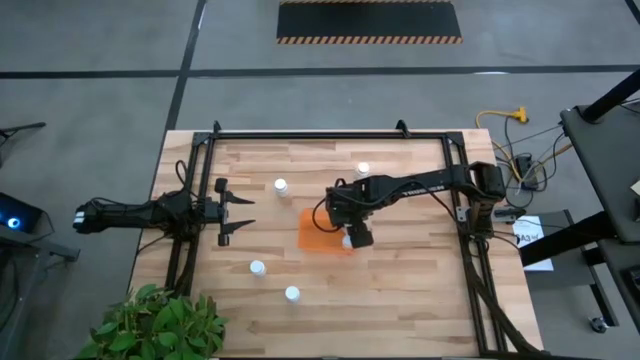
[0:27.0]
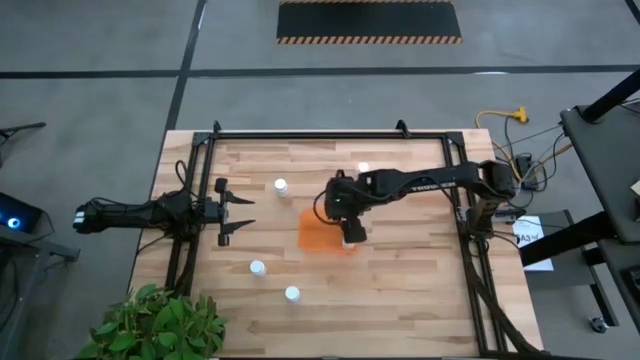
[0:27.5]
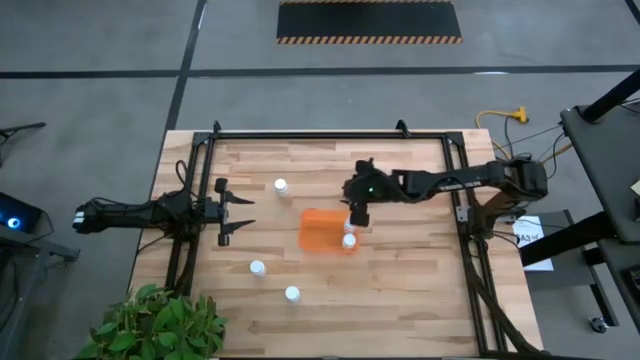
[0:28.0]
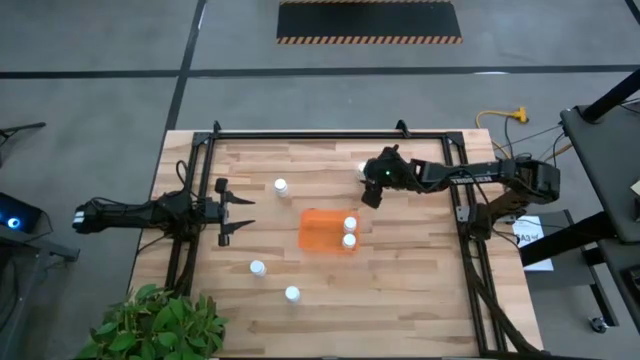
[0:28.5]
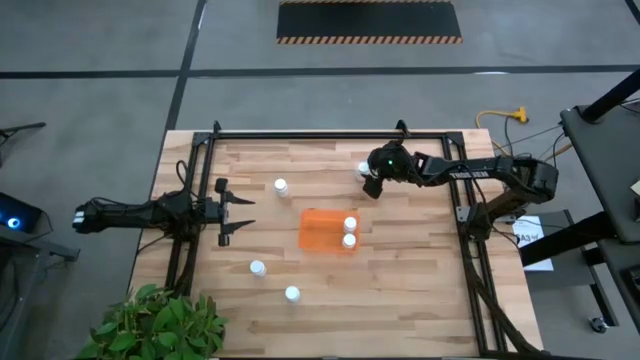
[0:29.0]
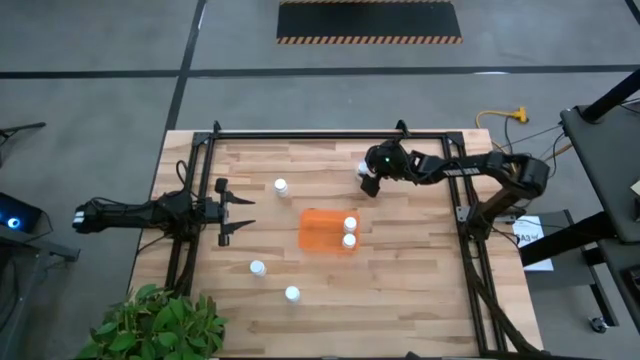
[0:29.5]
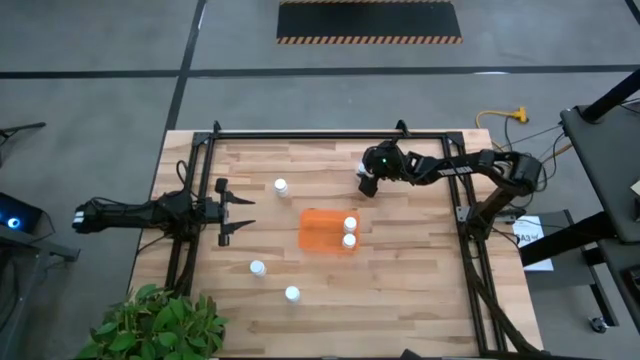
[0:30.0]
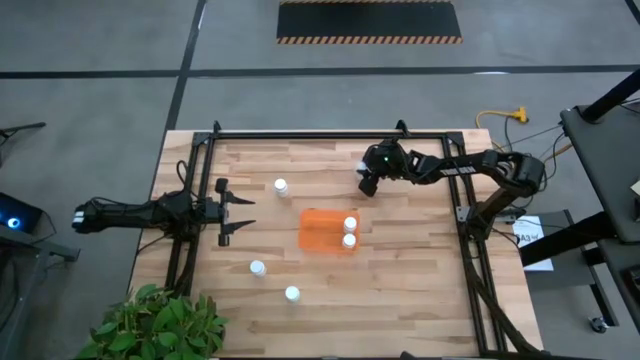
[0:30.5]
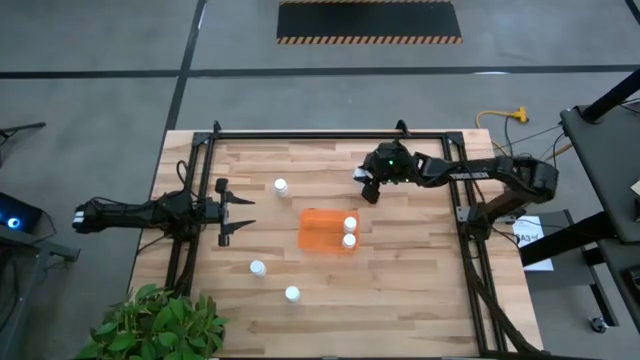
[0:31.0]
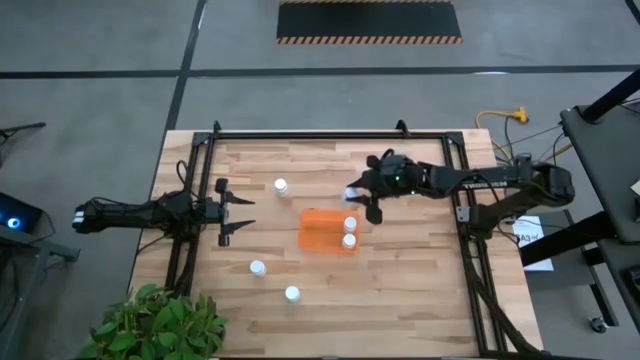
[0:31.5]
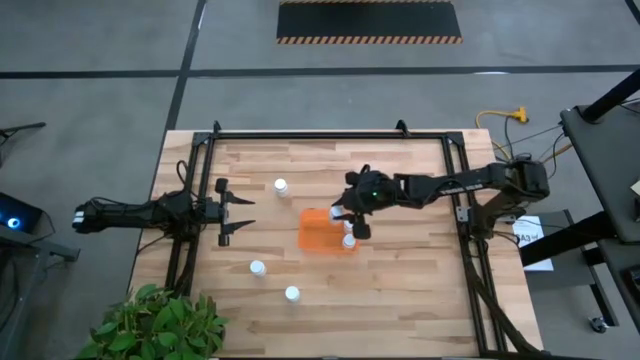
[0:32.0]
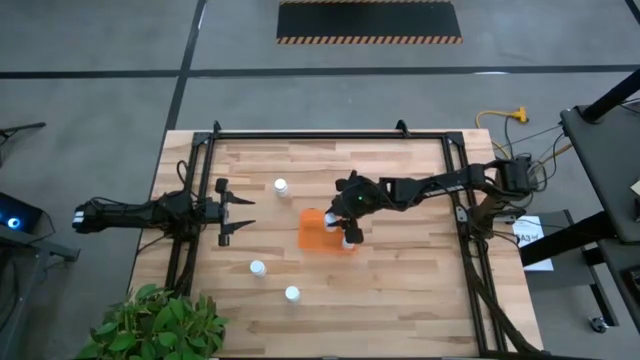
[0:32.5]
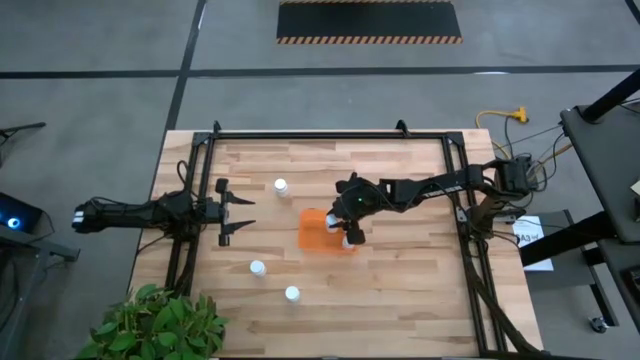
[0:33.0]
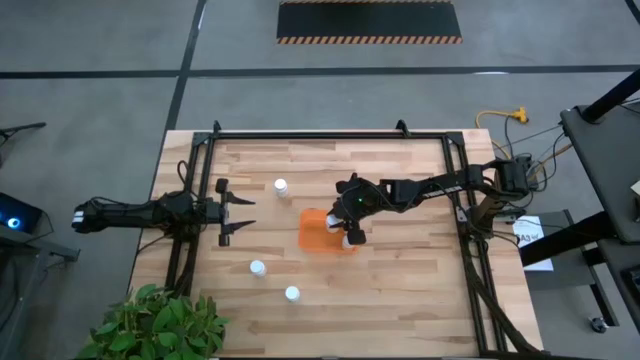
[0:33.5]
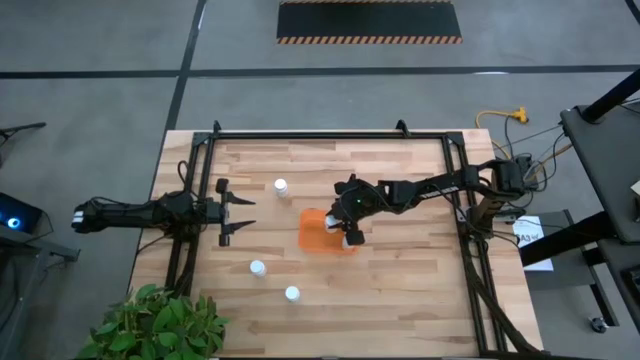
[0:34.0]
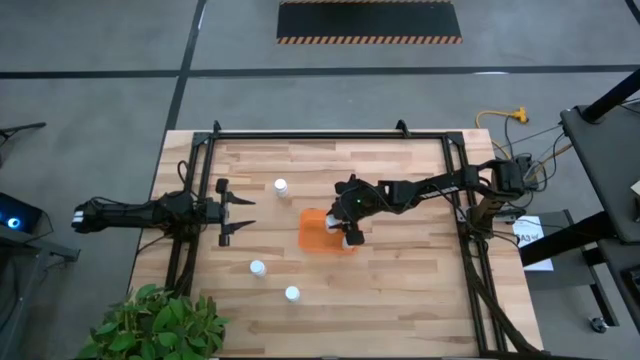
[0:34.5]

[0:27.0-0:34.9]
Task: Pick and place pill bottles into a basket
Put the white medicine bottle into the orange bin

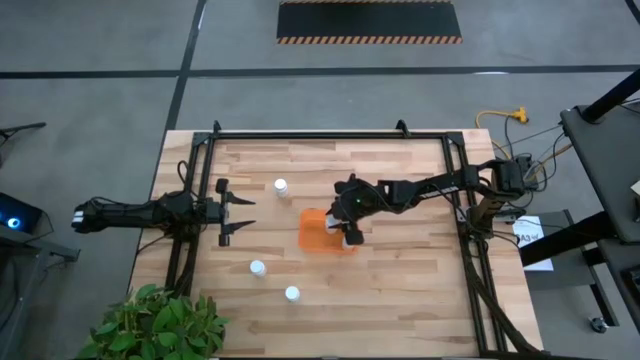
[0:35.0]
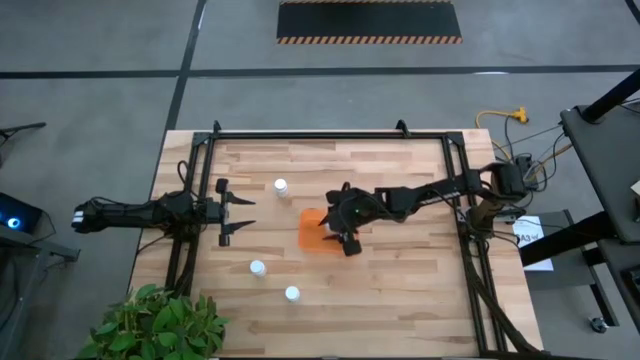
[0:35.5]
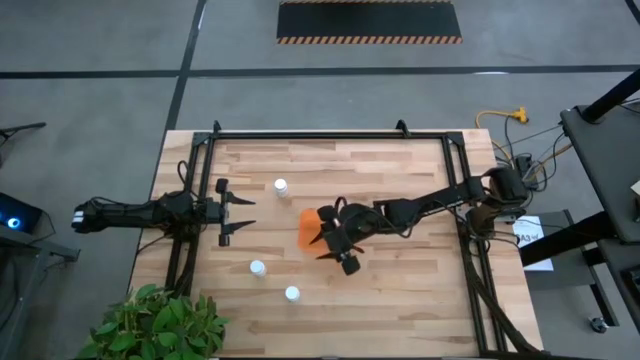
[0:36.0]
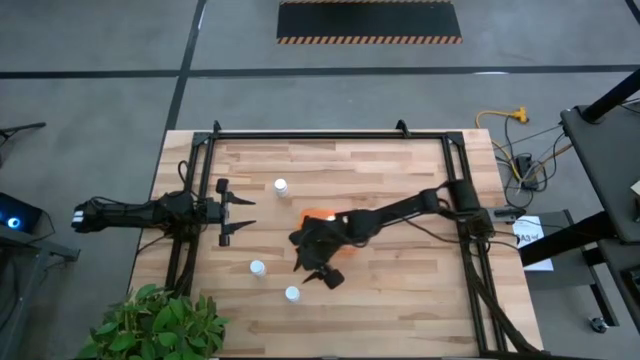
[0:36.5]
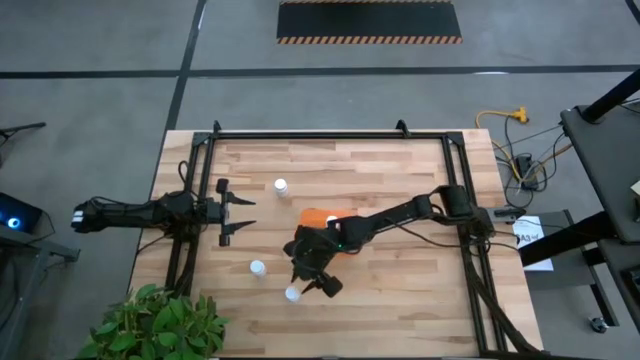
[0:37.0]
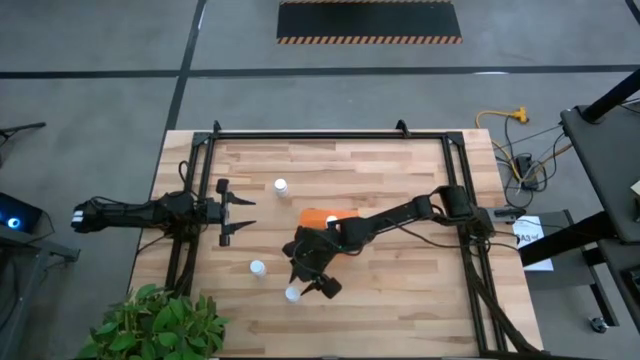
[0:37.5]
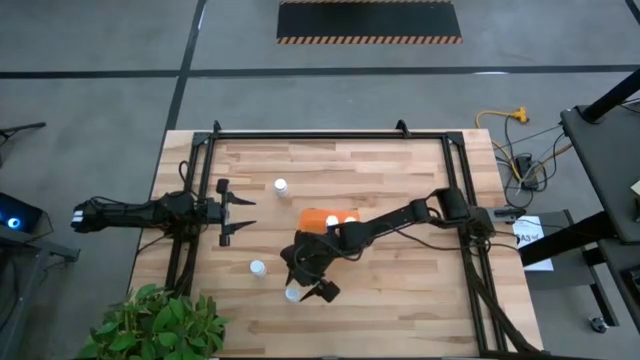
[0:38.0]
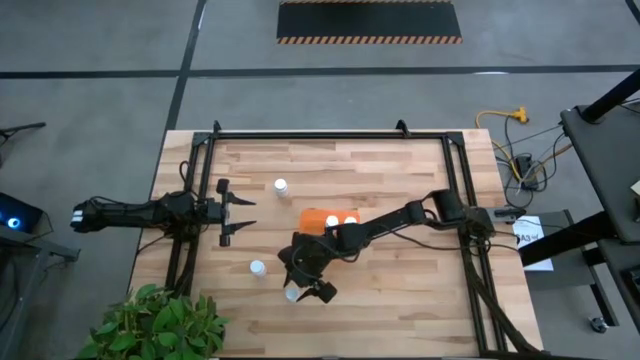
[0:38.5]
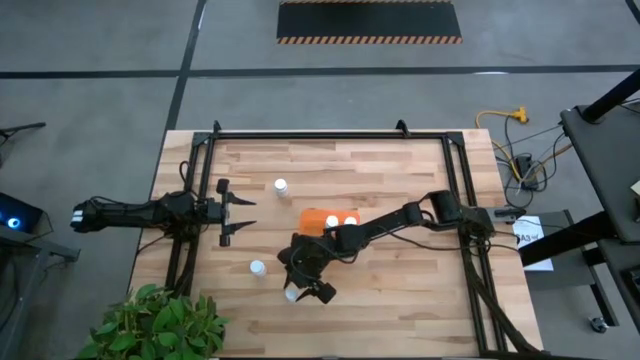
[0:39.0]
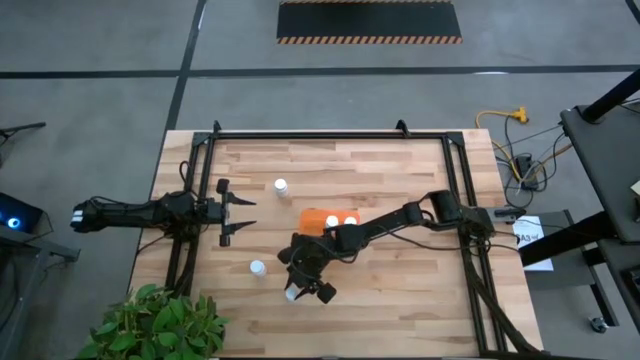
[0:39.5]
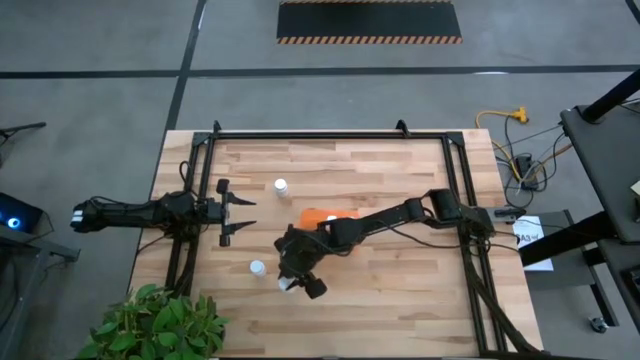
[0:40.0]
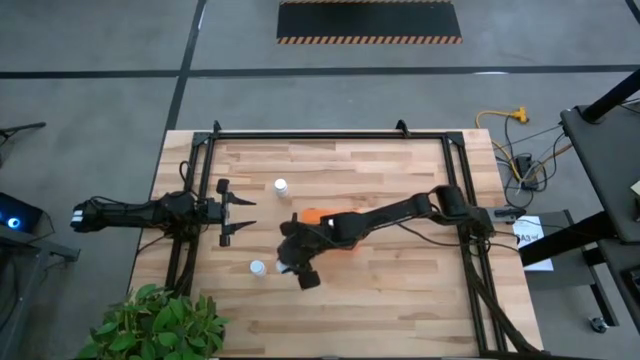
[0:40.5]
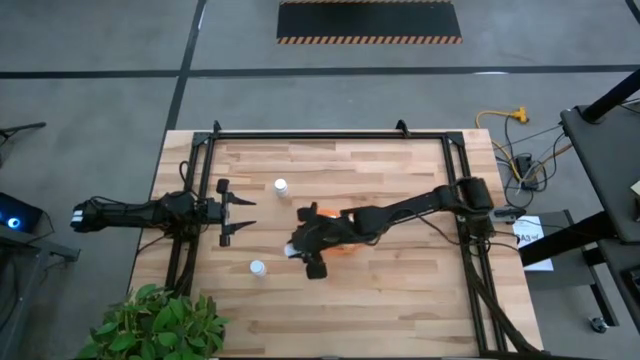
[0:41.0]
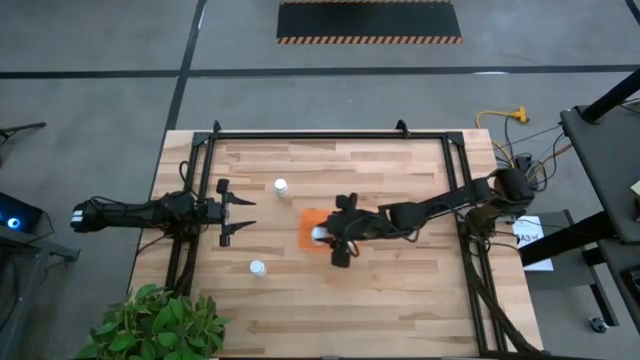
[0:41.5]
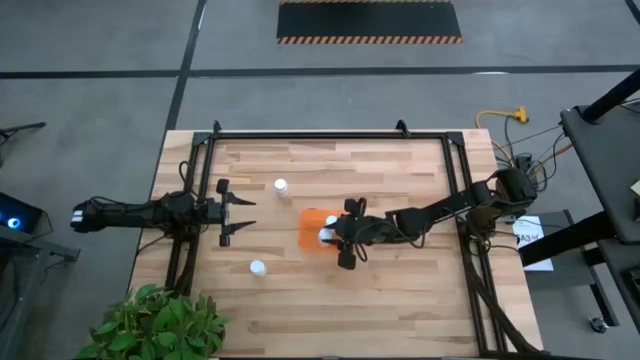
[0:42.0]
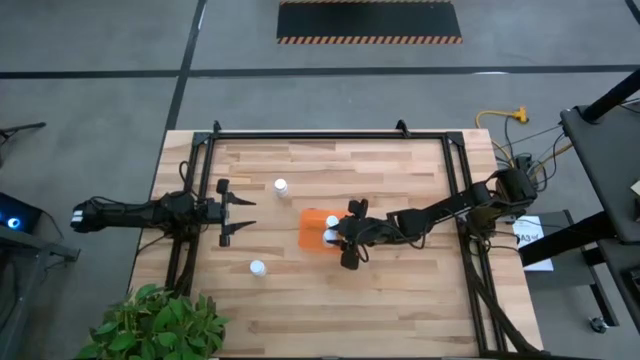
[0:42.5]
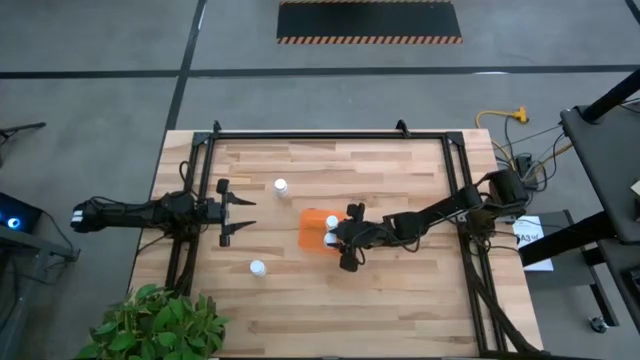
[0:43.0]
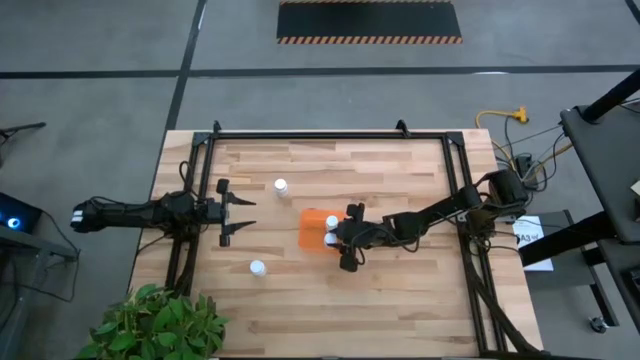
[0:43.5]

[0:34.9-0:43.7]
Put the white medicine bottle into the orange bin

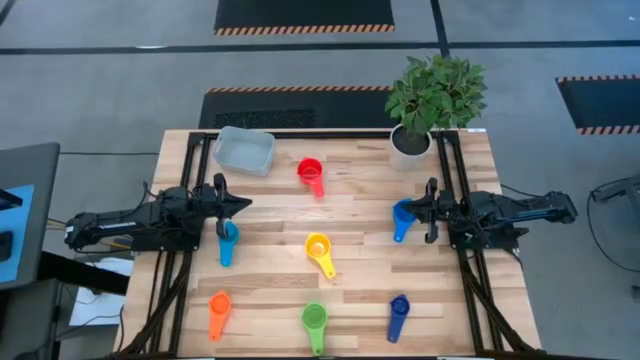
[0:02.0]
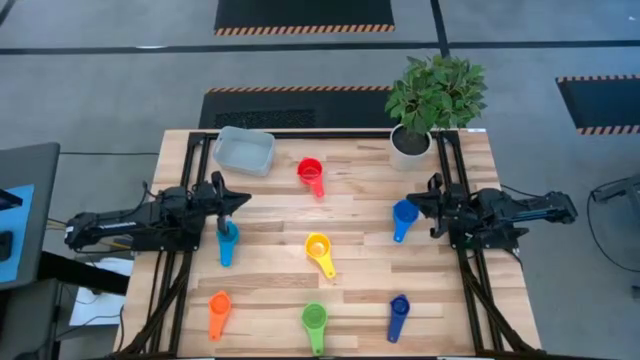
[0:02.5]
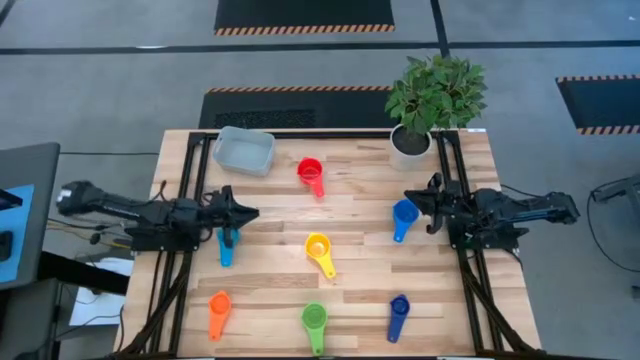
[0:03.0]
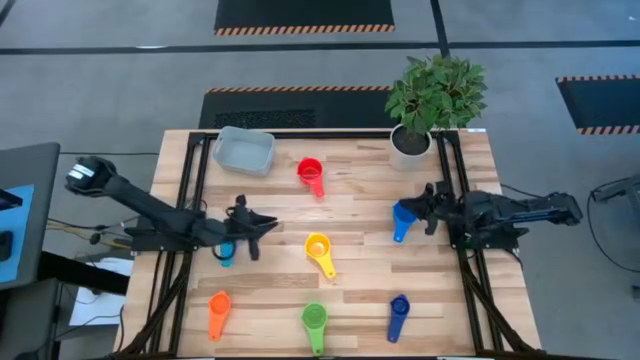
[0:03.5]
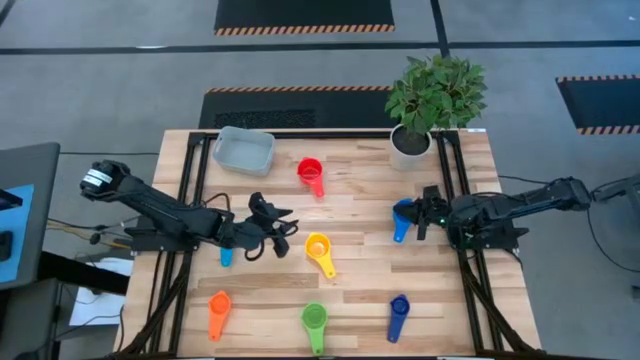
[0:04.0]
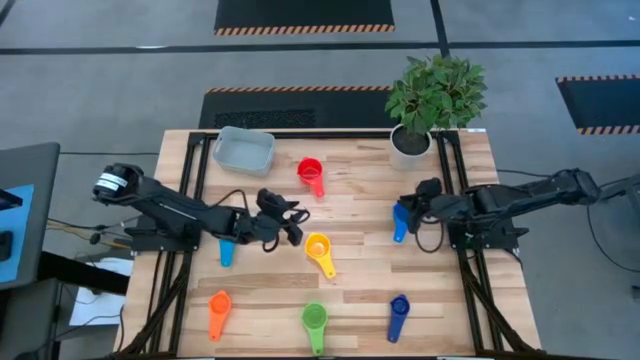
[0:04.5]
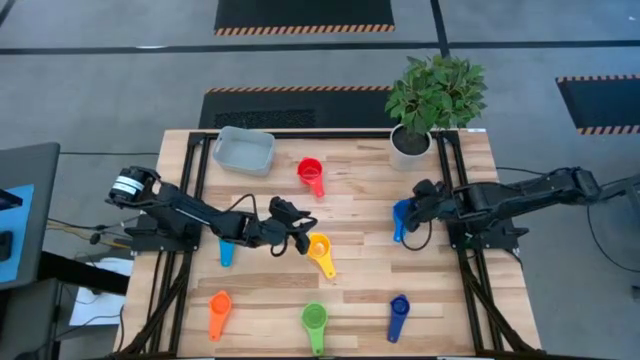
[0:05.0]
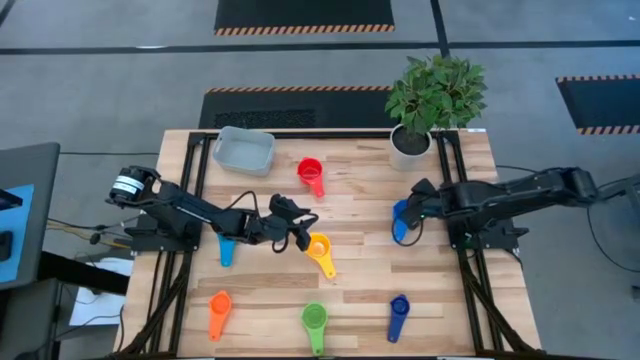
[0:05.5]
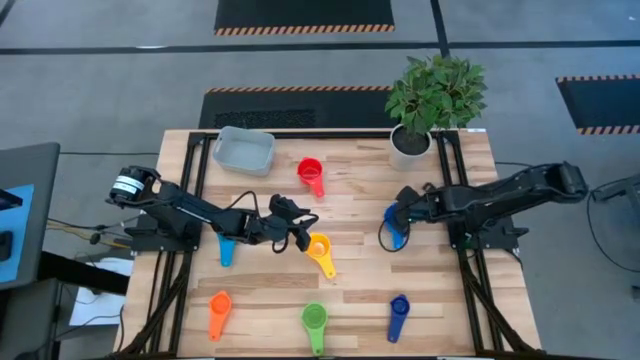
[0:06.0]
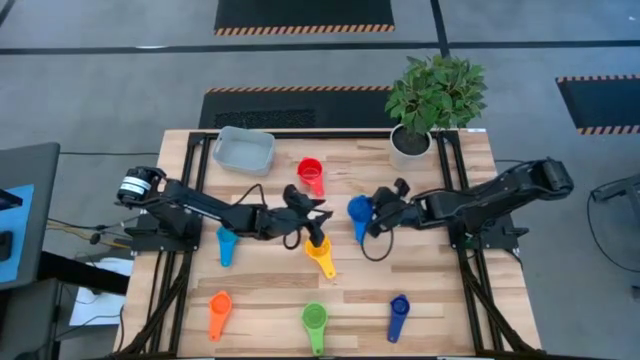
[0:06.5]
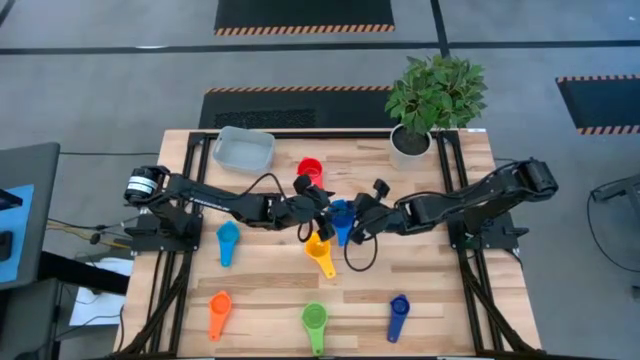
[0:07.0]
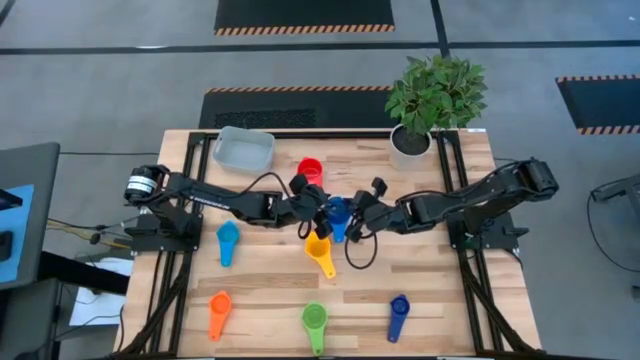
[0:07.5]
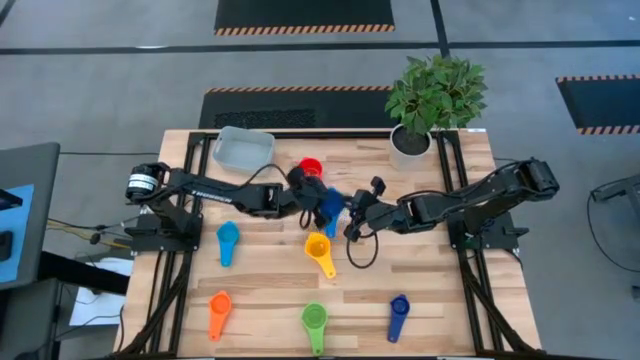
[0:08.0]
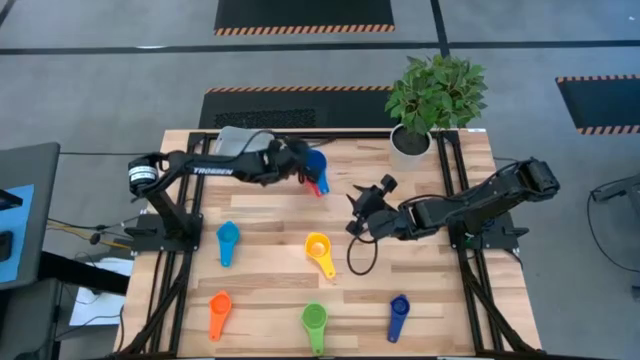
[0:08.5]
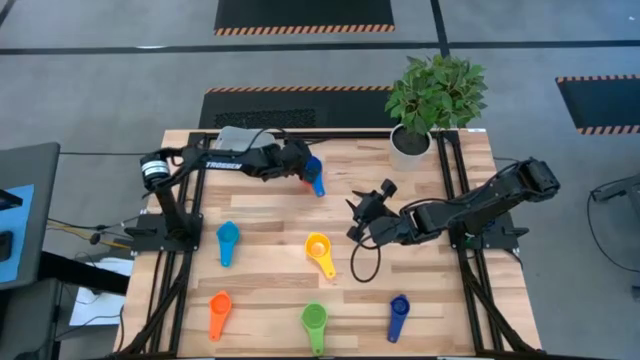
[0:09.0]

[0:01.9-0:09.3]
Task: Nest measuring cups in basket
Stack the blue measuring cup on top of the red measuring cup
